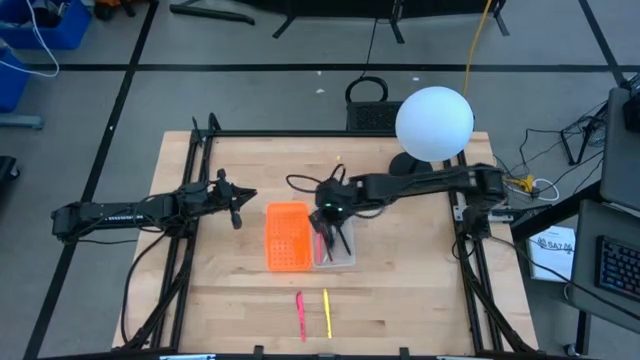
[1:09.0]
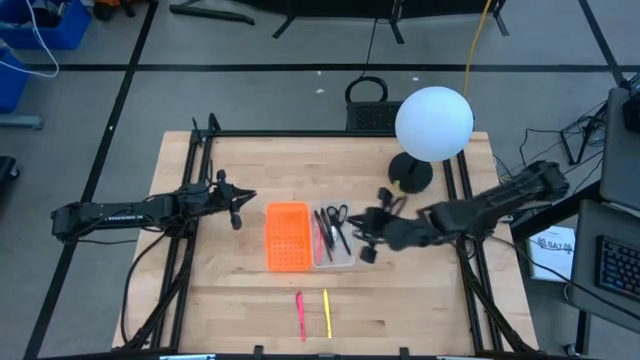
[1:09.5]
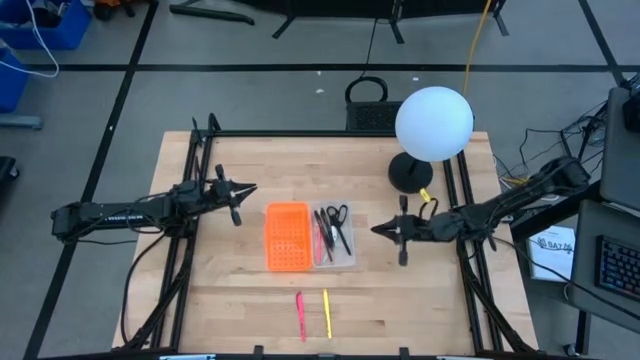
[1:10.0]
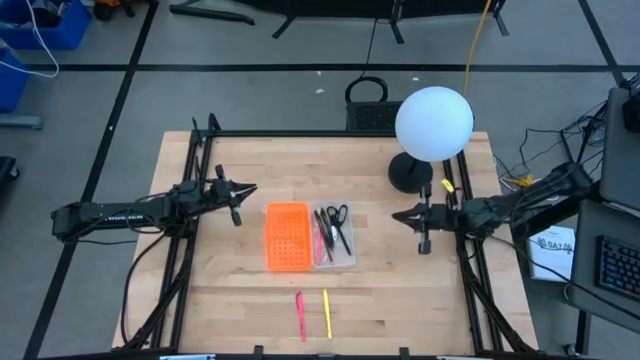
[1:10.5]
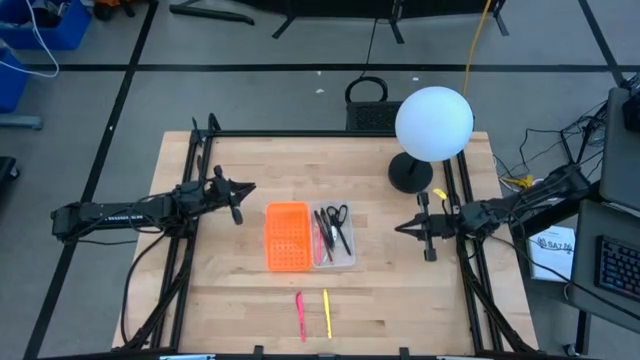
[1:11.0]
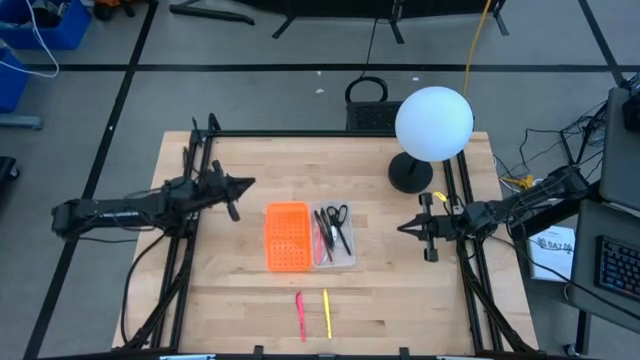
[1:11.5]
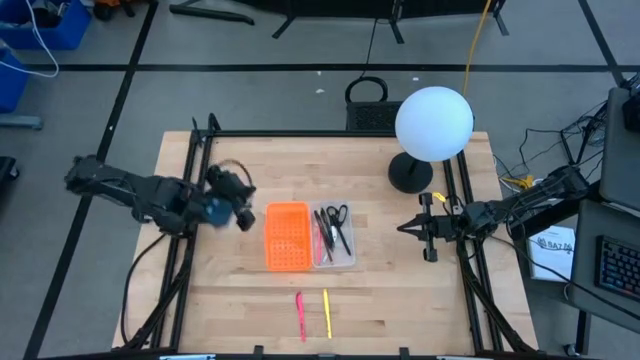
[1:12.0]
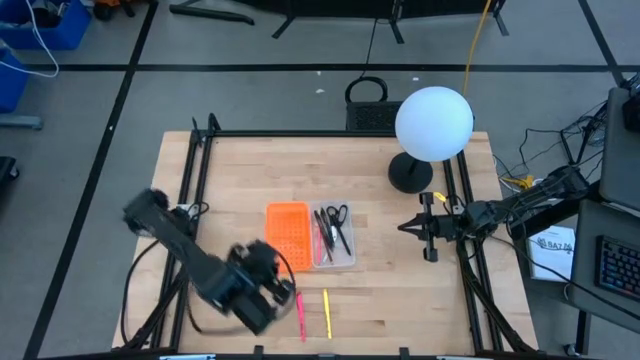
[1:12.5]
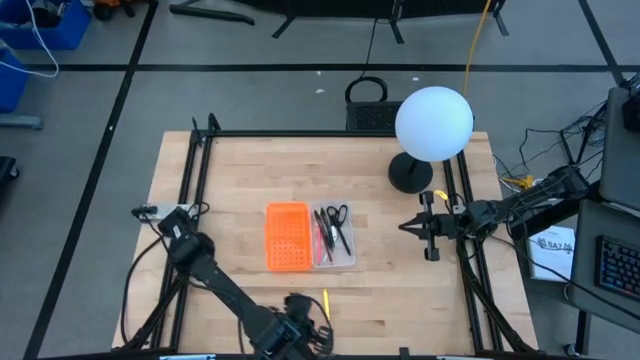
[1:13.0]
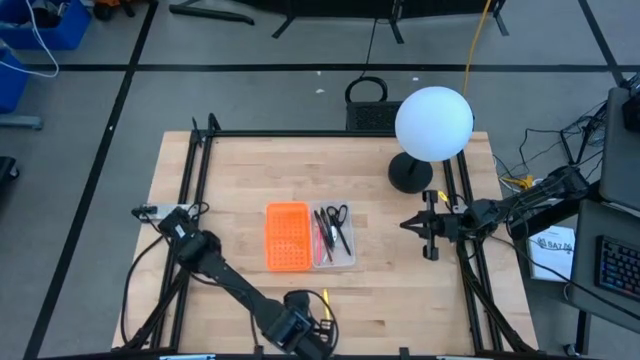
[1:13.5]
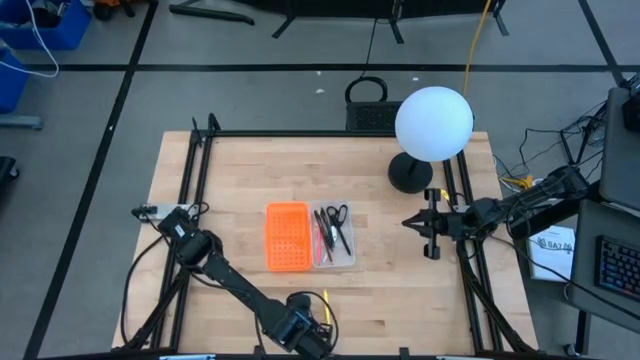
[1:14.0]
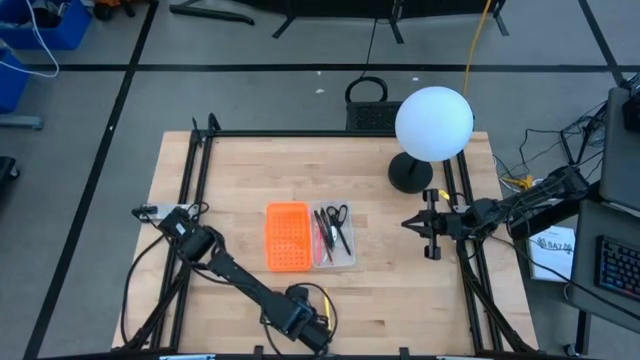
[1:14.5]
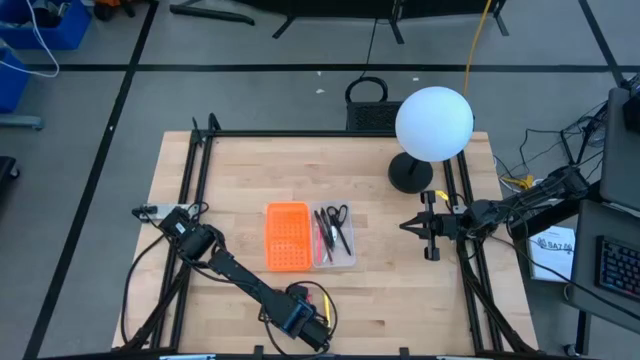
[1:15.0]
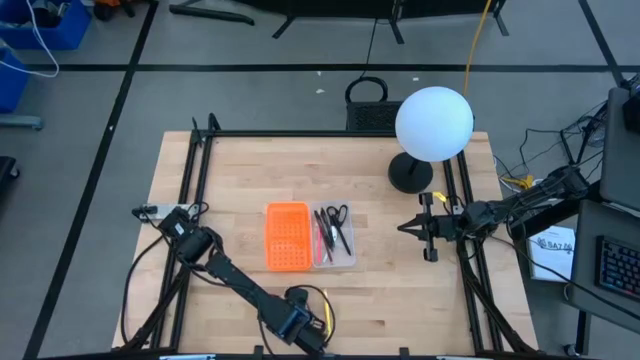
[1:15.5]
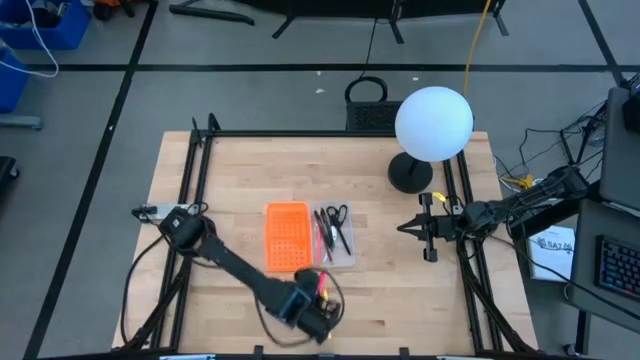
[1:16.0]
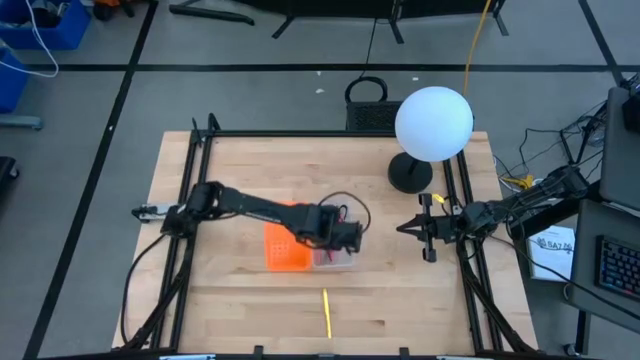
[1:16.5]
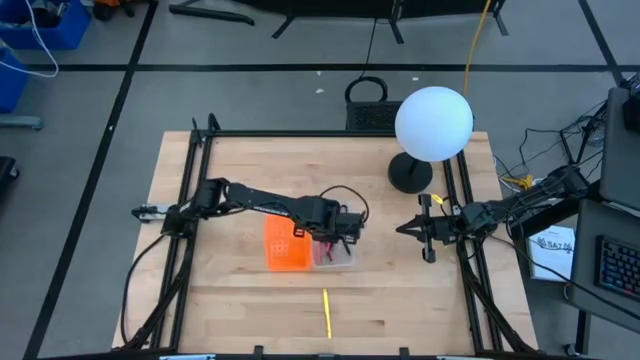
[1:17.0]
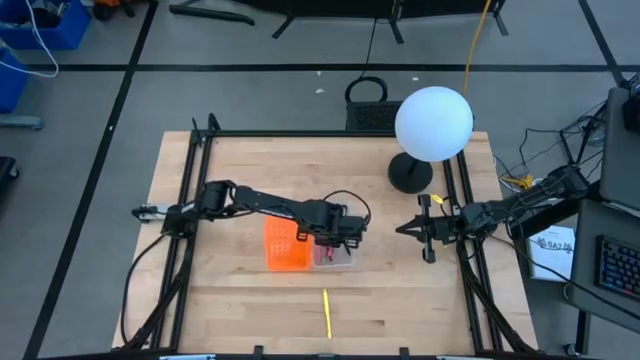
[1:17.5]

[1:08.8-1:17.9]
Task: Pick & place school supplies into a supply box
Put the pink pen into the supply box

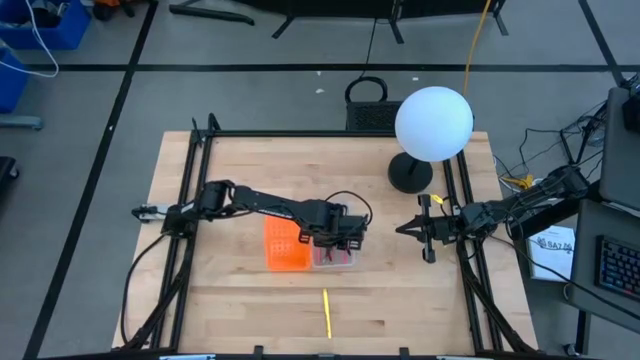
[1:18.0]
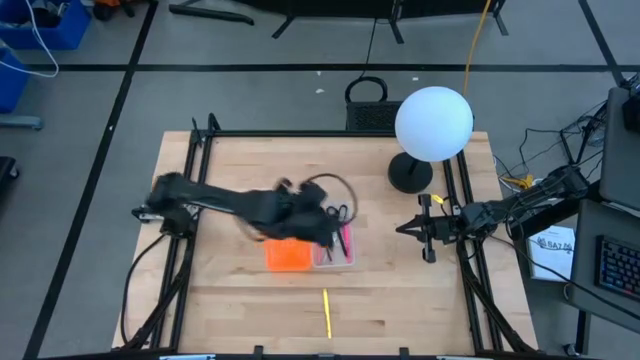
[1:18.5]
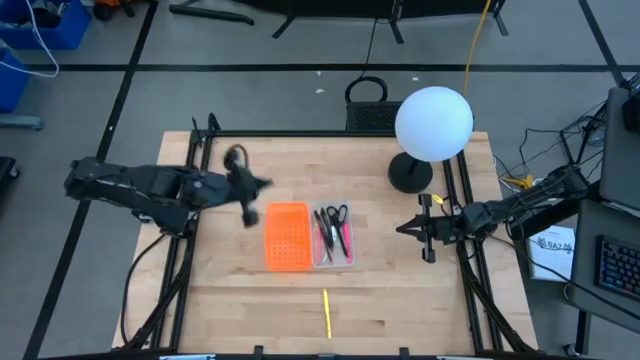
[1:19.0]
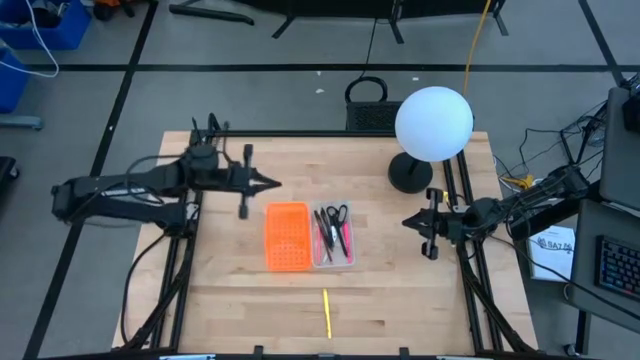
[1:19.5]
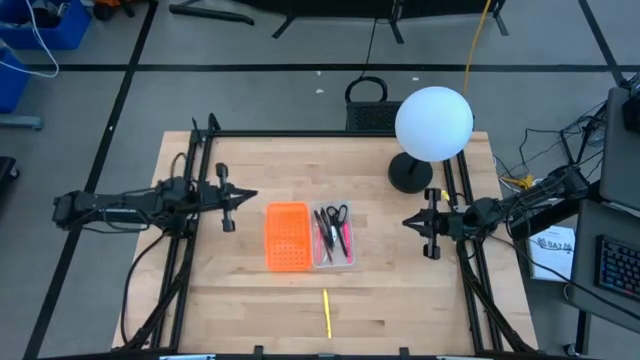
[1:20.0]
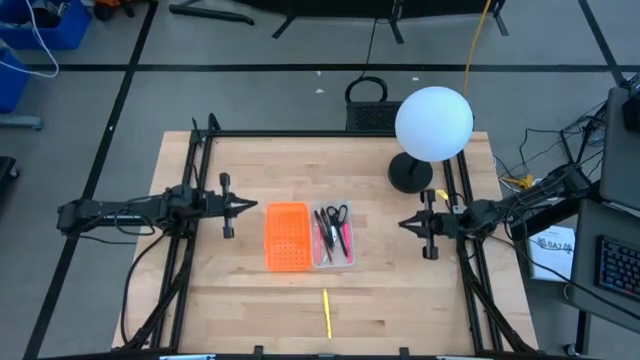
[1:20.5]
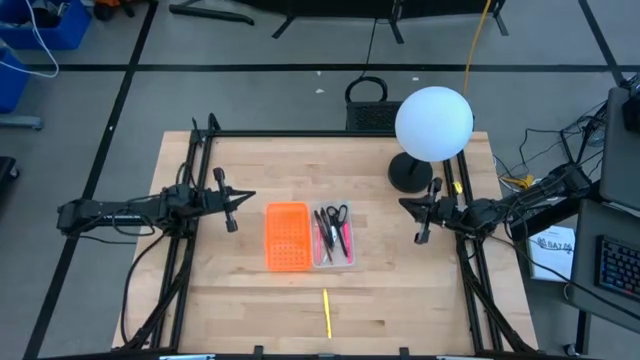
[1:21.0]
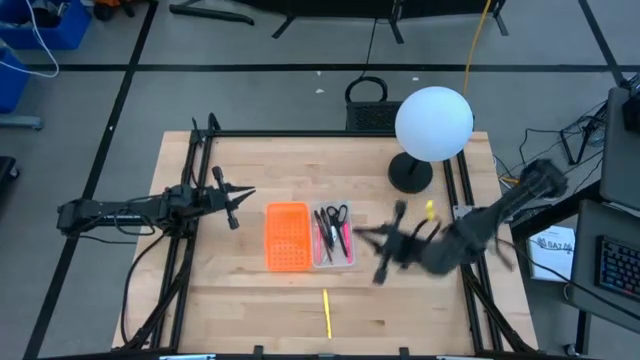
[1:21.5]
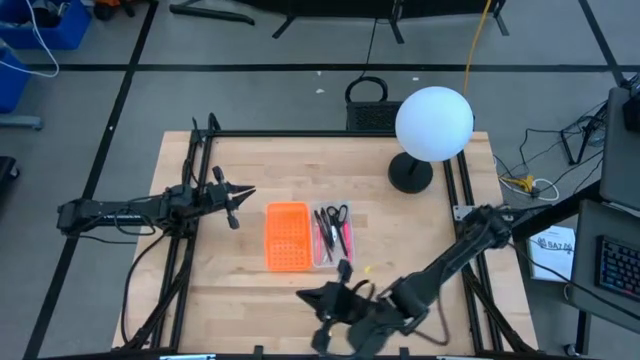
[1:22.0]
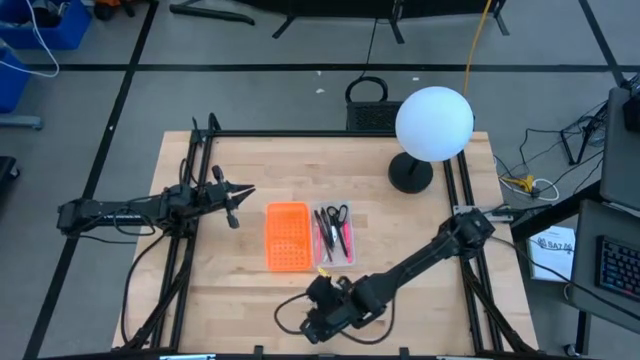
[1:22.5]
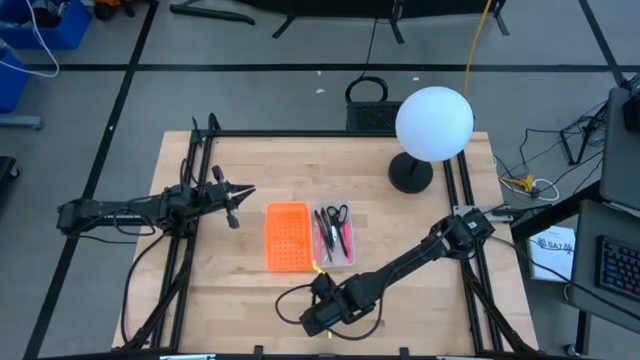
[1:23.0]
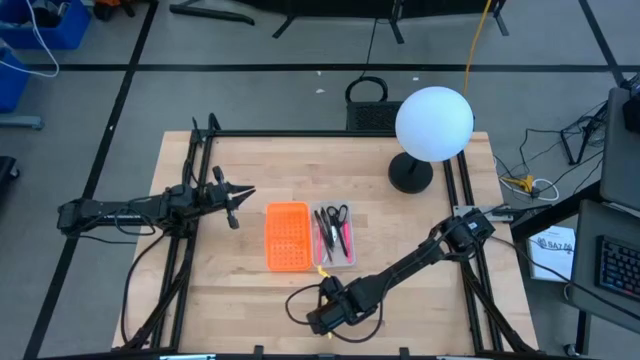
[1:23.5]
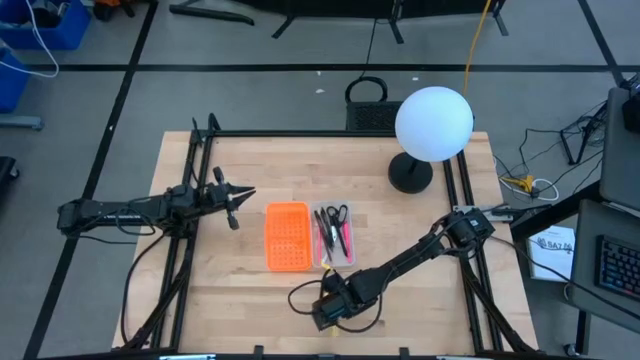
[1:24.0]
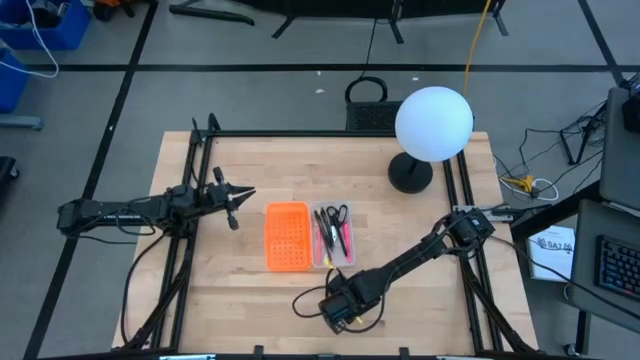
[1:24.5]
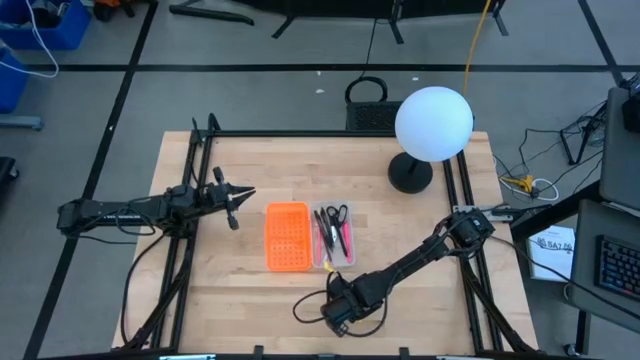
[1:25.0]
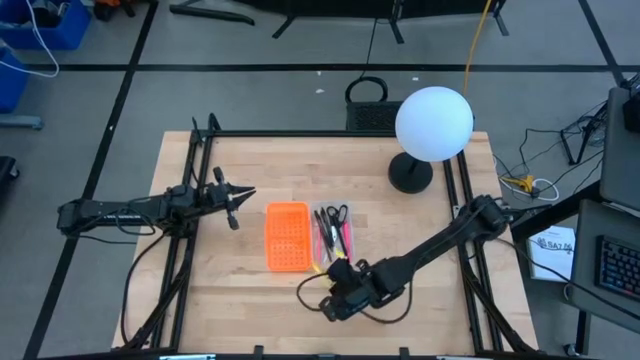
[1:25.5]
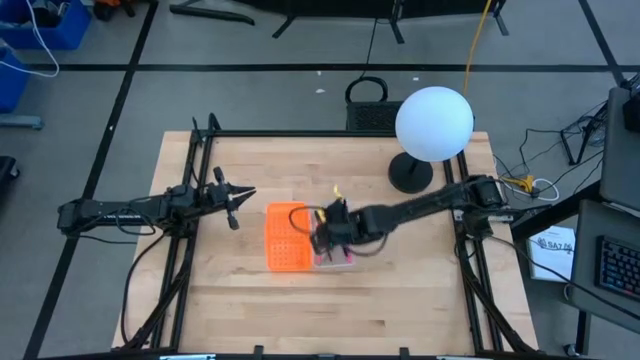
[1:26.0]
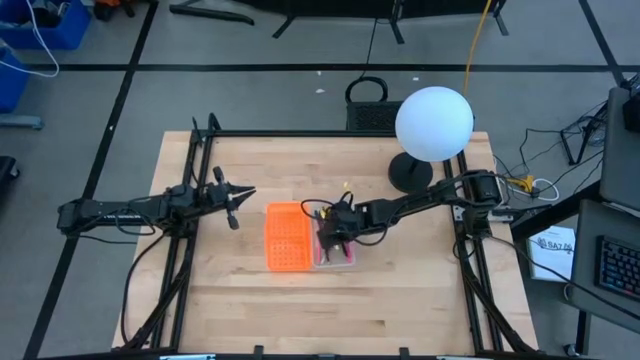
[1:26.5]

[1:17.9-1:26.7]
Put the yellow pen into the supply box

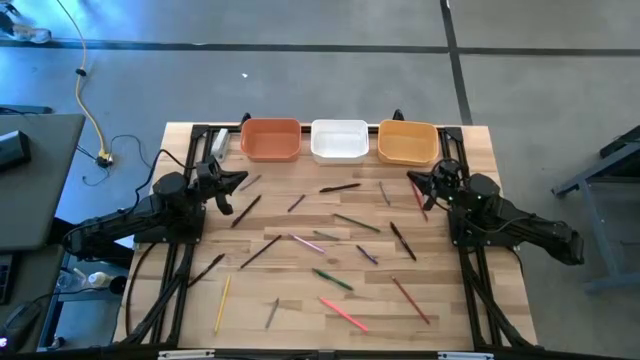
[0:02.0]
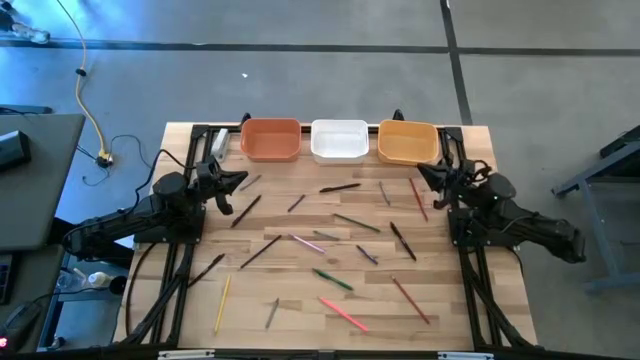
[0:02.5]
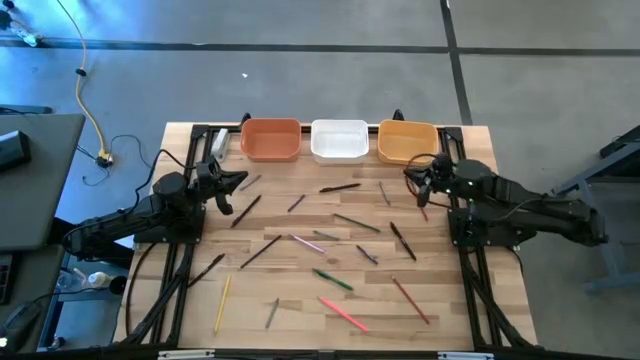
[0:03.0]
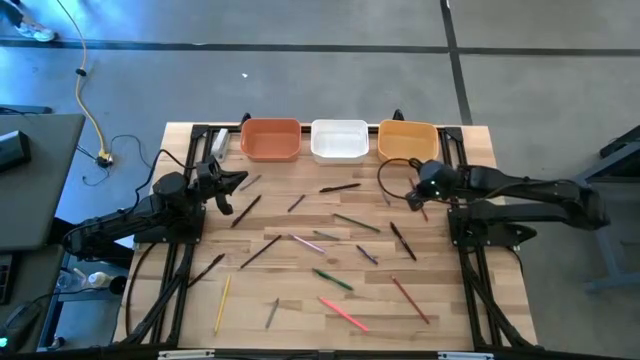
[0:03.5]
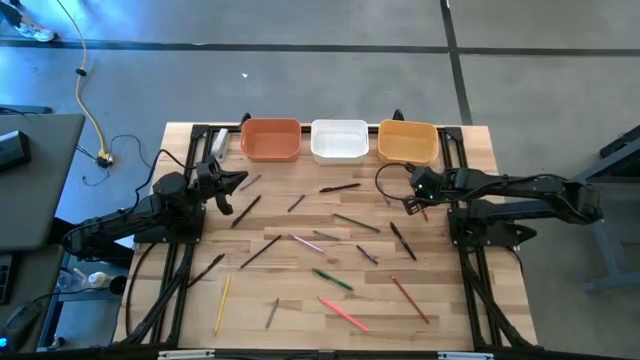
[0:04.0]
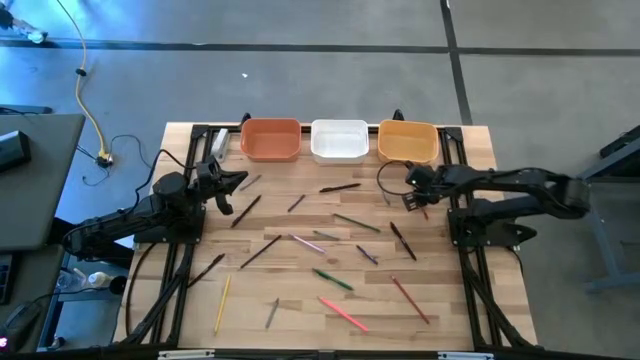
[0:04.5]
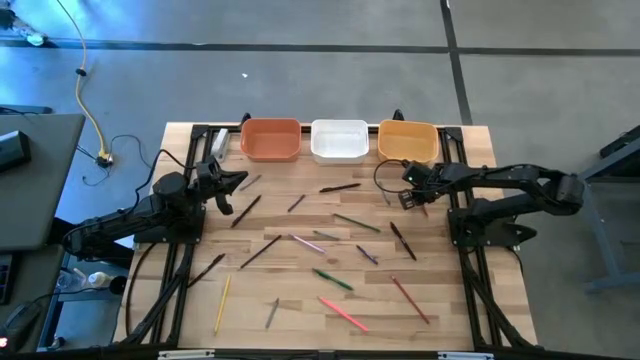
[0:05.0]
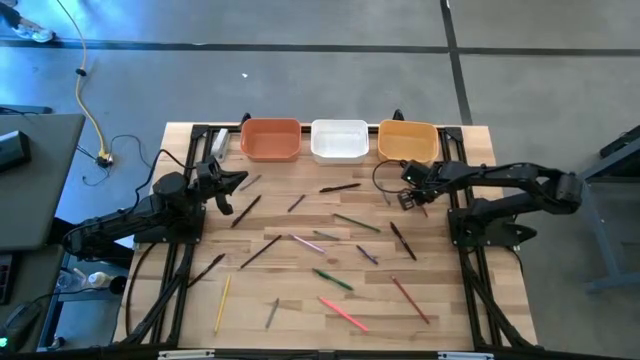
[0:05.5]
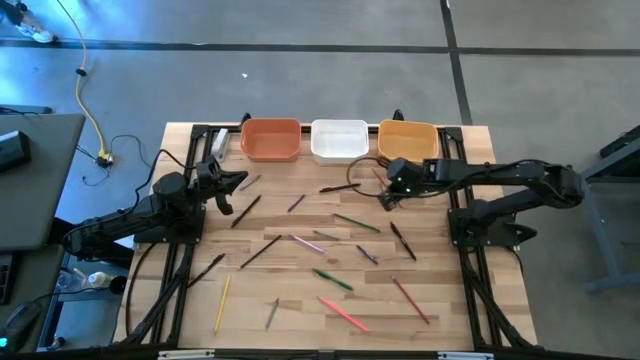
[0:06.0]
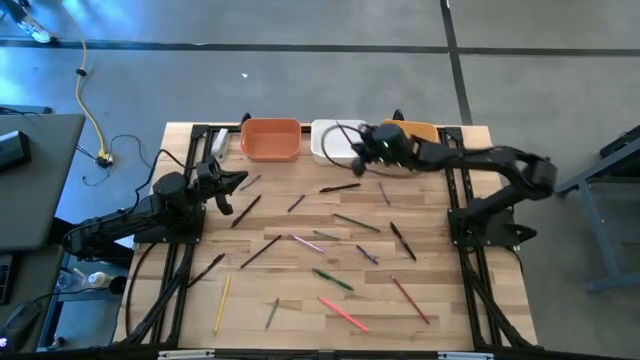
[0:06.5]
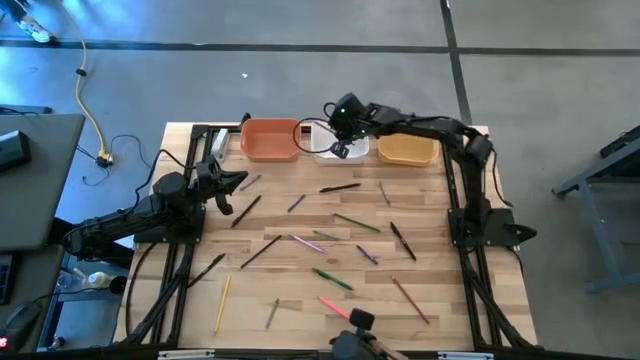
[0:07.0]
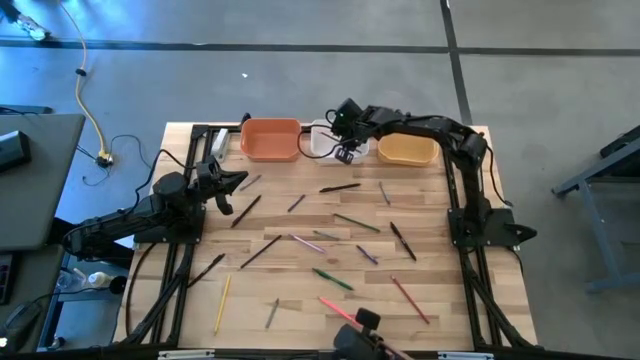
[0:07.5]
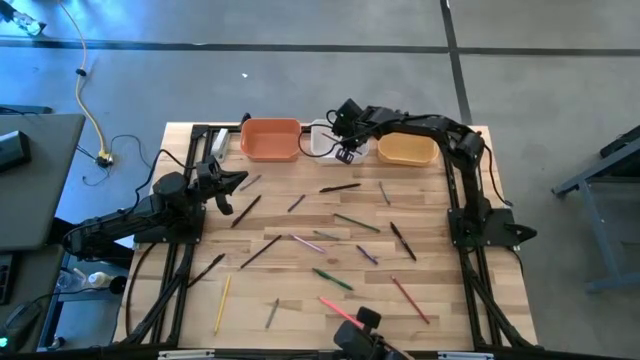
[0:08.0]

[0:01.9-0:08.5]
Task: Sort crayons/erasers/pens/pencils in bins
Put the top red pencil into the white bin
